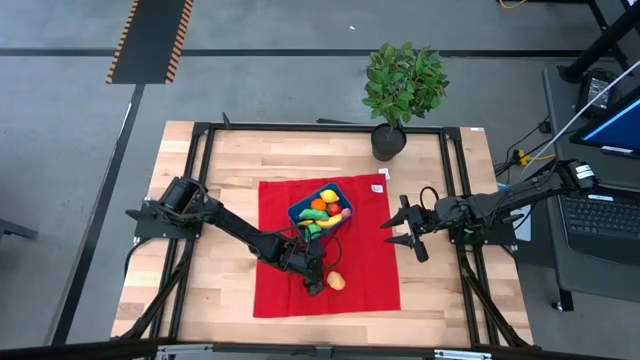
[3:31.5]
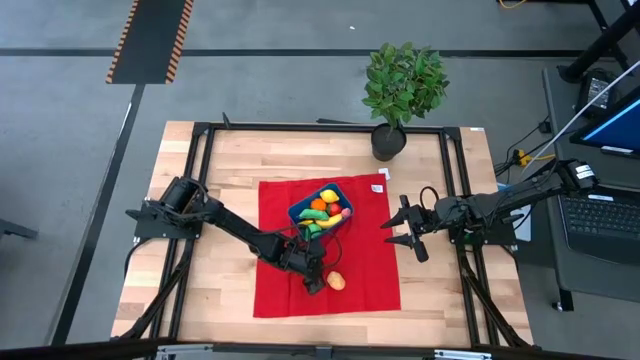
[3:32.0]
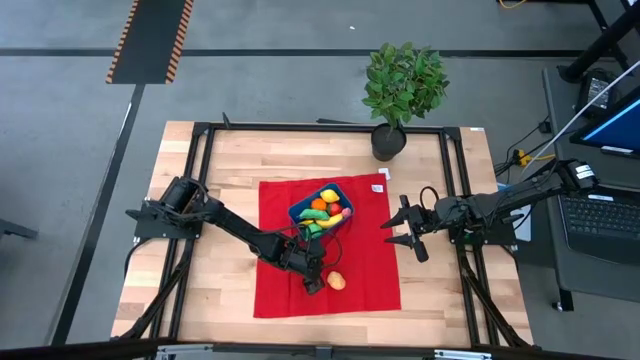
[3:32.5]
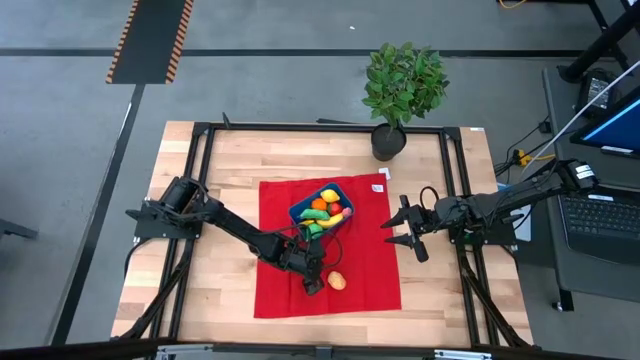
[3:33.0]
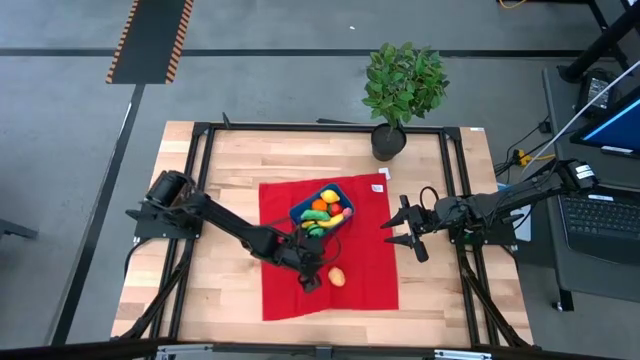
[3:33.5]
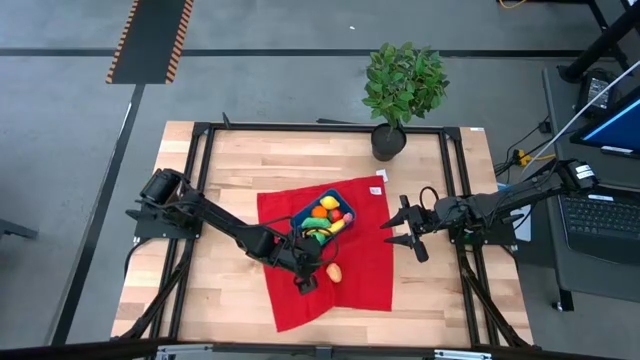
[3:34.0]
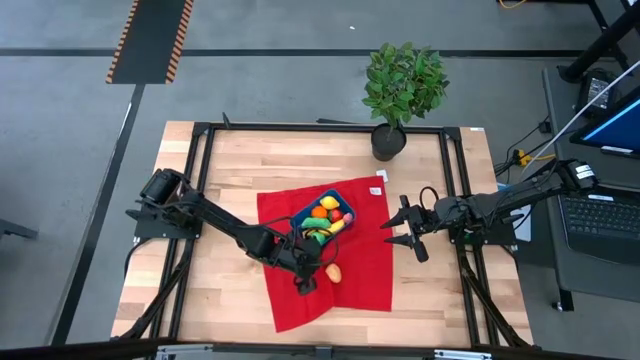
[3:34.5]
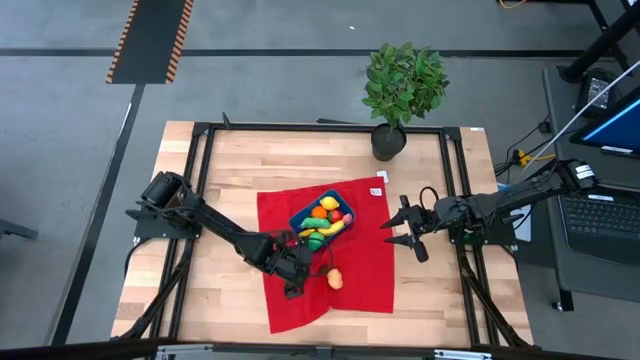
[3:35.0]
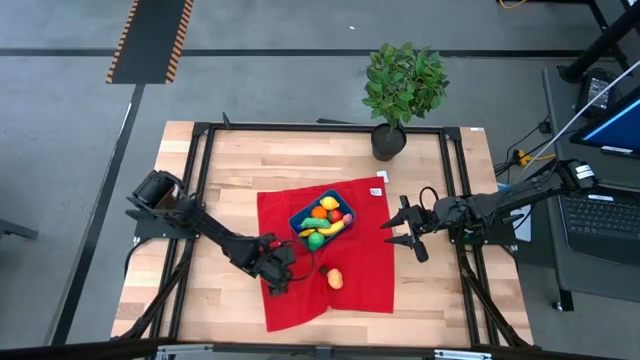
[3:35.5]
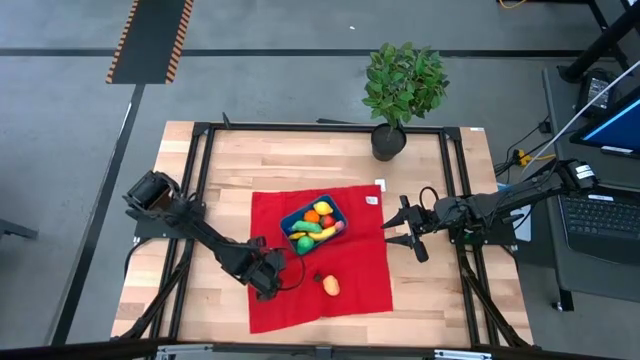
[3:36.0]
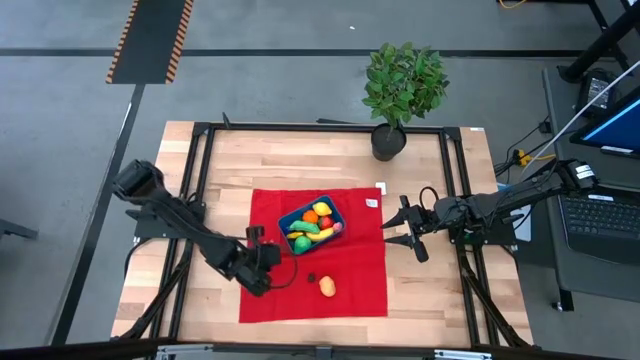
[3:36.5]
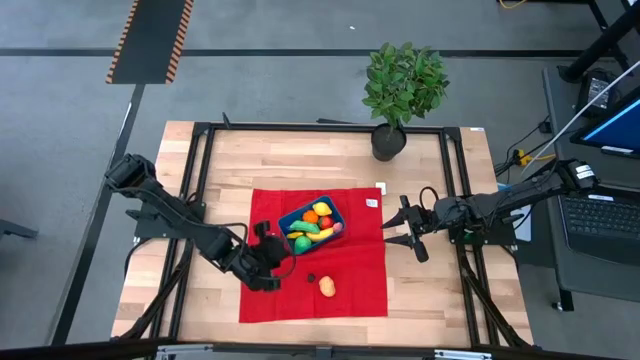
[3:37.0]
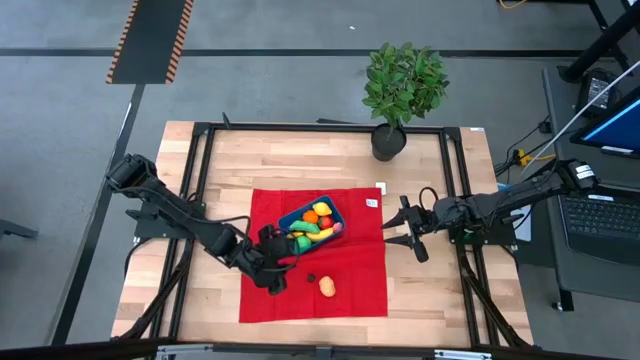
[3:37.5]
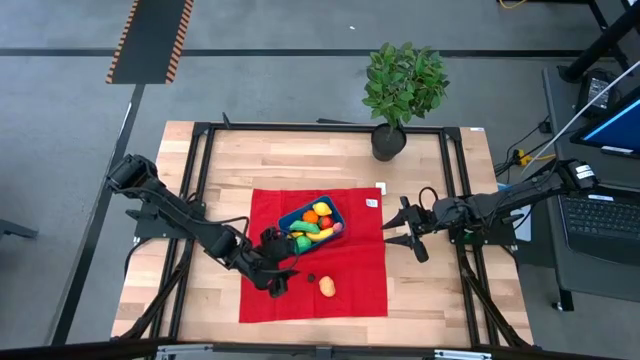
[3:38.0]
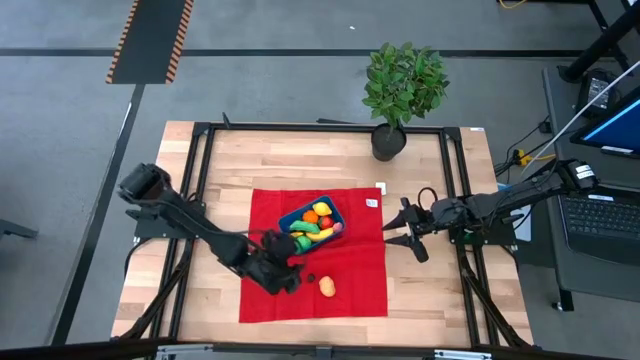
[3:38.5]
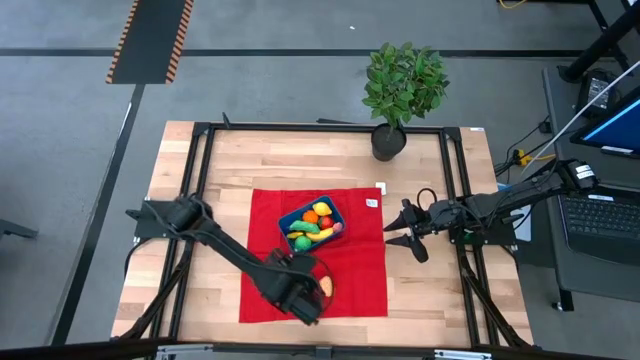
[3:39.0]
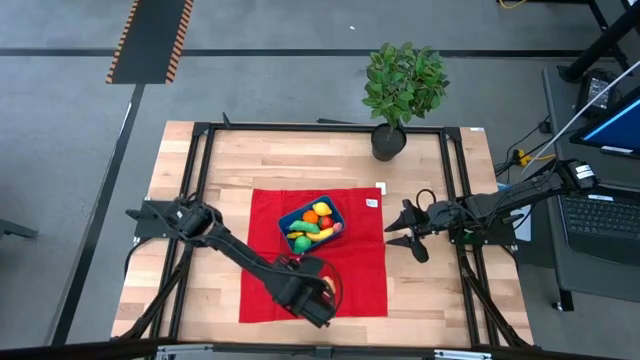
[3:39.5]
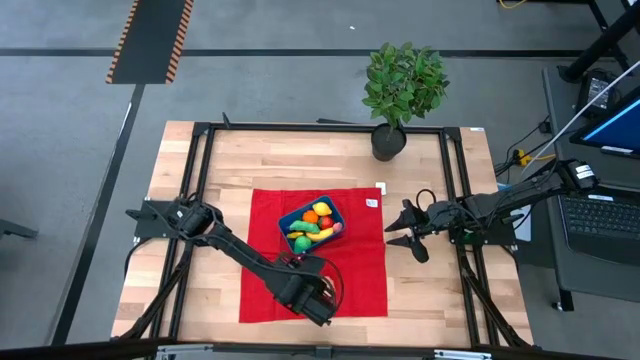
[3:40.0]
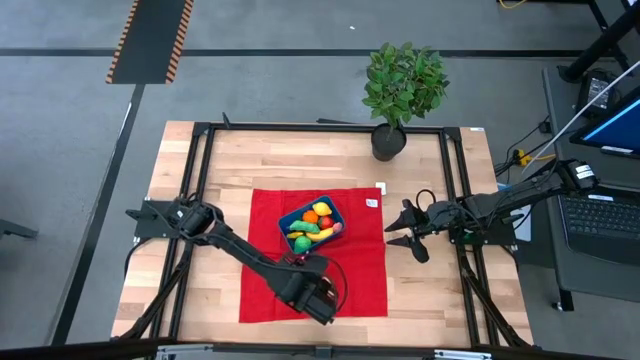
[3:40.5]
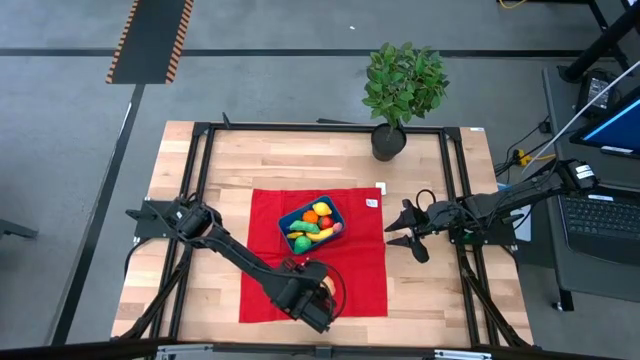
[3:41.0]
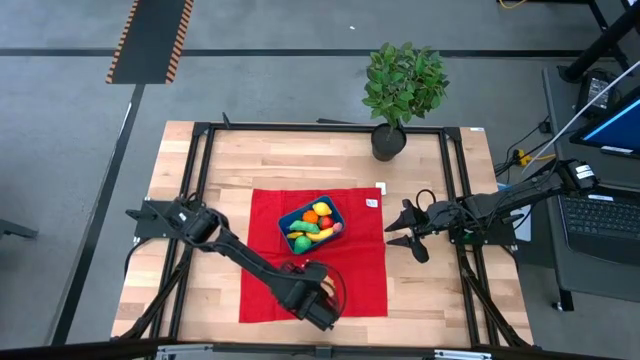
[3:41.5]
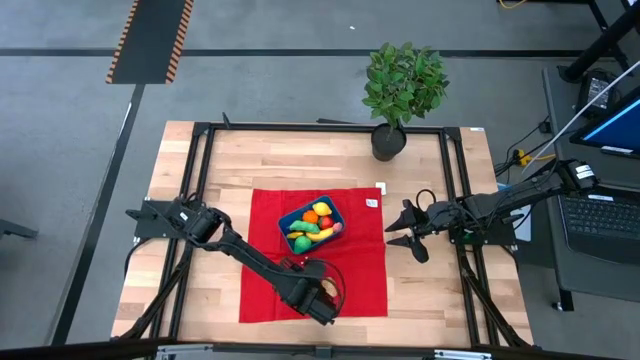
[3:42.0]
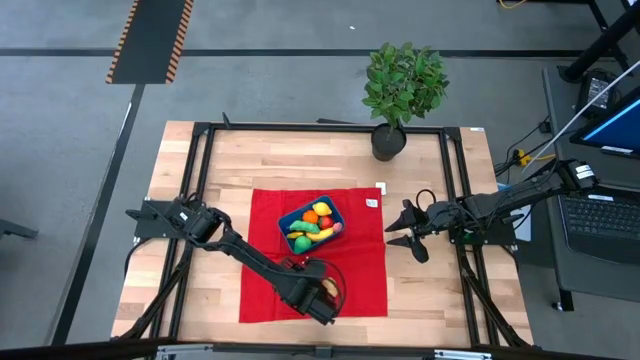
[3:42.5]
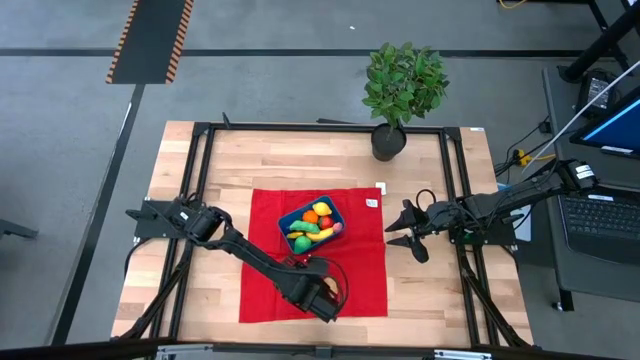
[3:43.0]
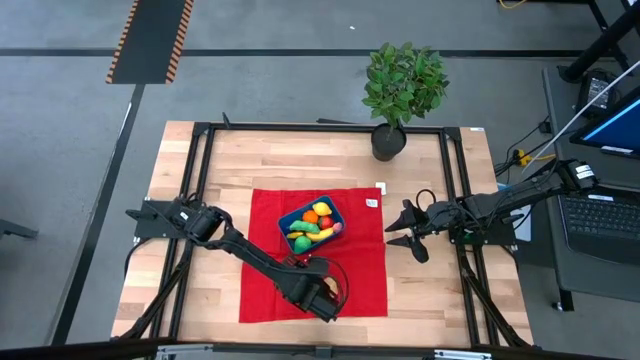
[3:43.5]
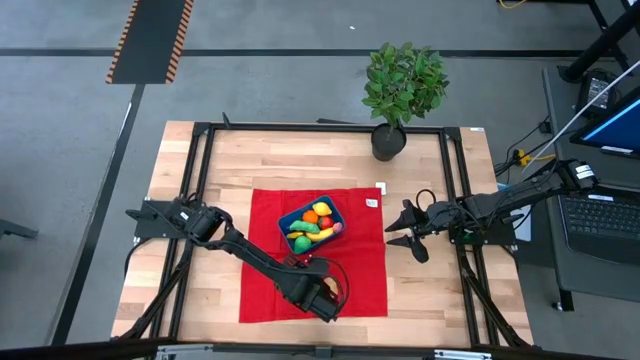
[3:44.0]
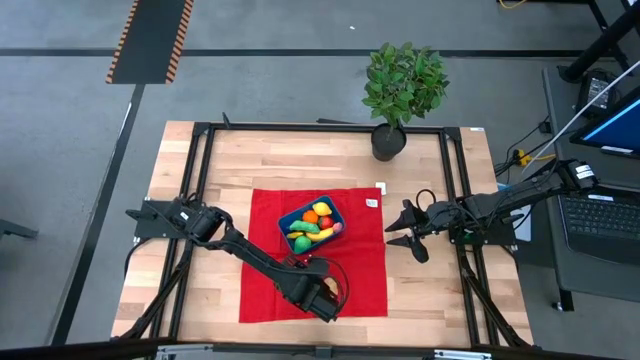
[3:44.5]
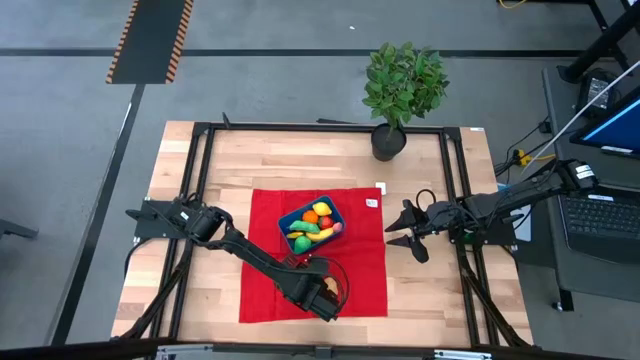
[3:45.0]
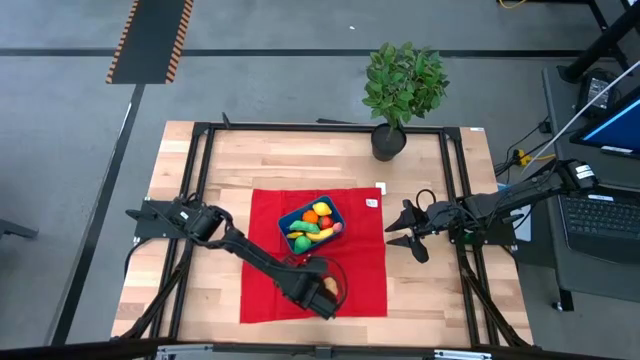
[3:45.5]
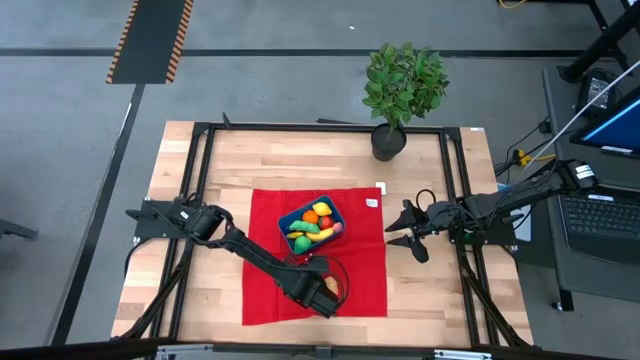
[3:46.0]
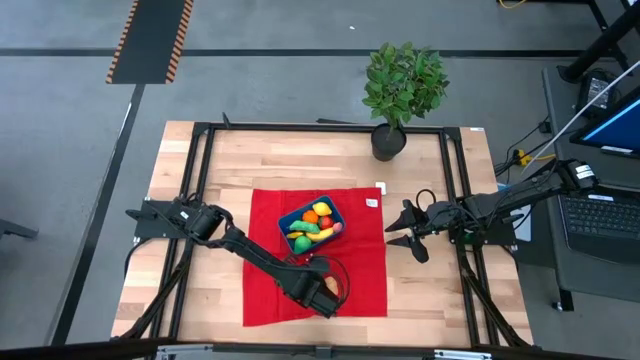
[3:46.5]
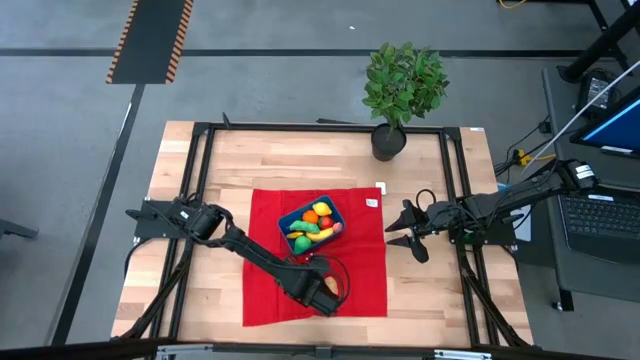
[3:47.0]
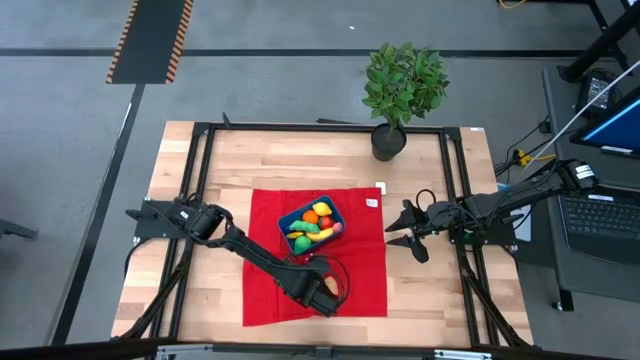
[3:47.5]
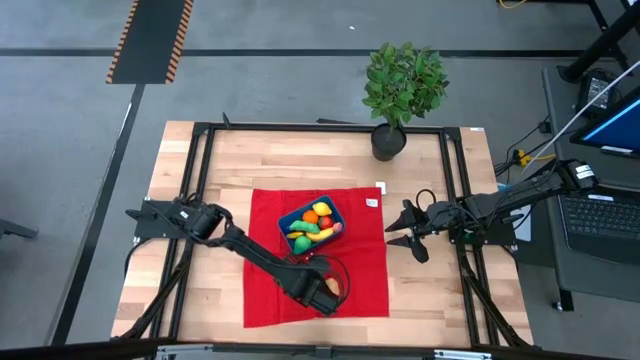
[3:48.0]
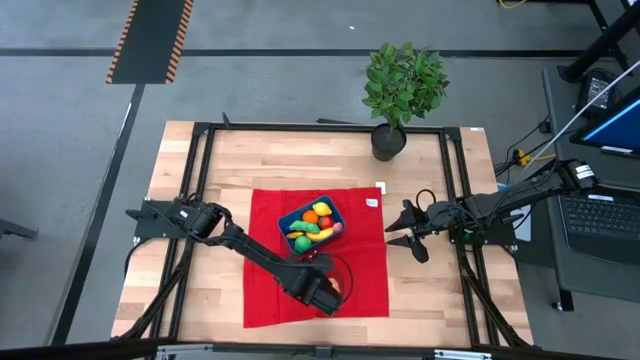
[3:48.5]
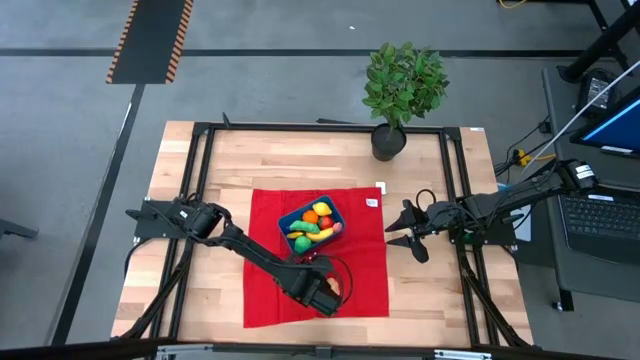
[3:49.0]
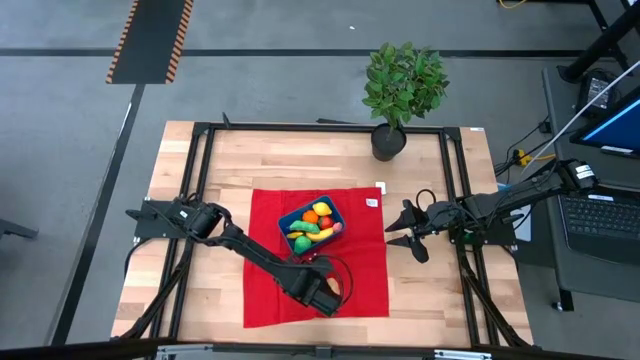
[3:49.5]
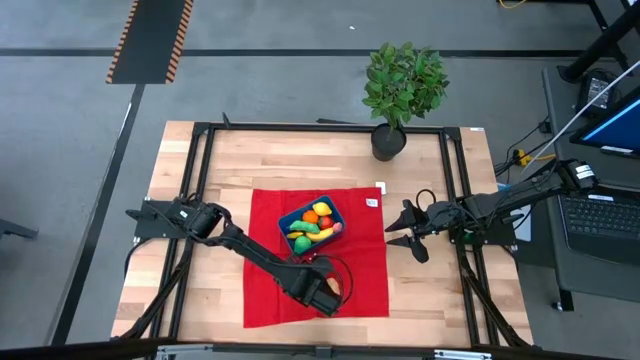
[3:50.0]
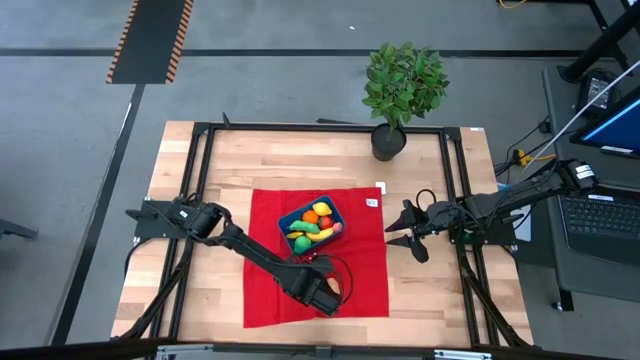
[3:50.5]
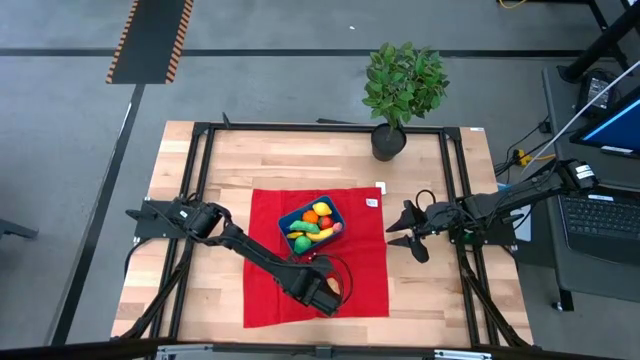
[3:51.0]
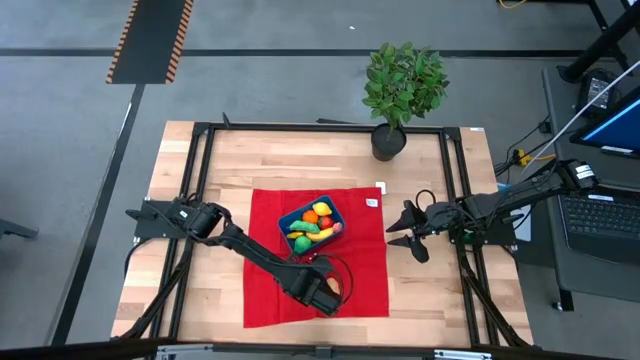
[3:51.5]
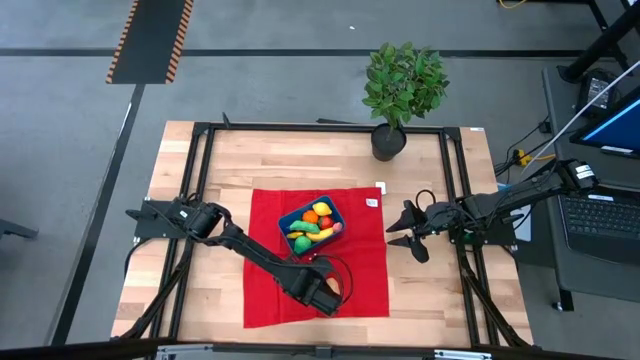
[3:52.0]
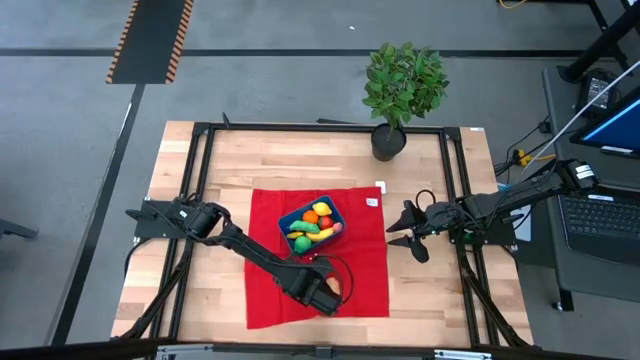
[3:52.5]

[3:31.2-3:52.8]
Task: Pick and placing Produce into tupperware
Put the blackberry into the blue bin
